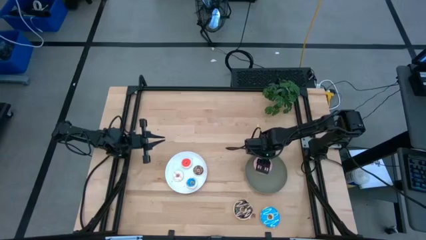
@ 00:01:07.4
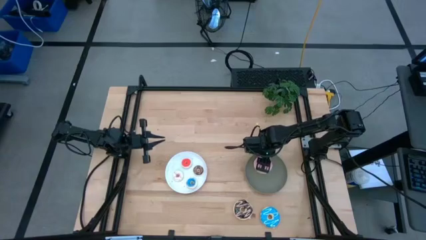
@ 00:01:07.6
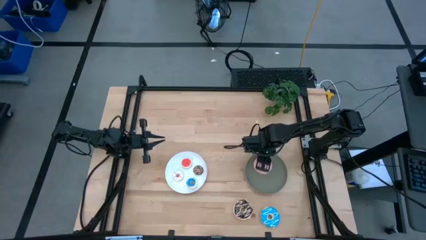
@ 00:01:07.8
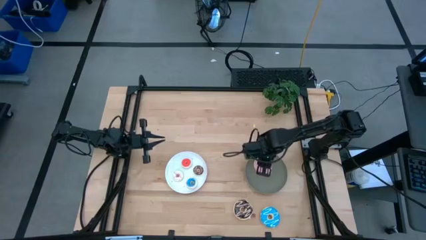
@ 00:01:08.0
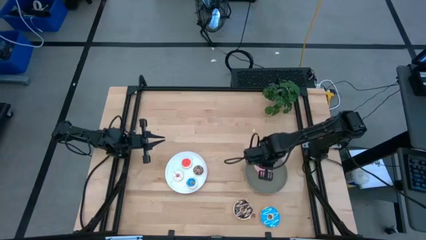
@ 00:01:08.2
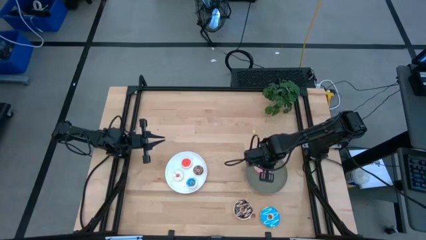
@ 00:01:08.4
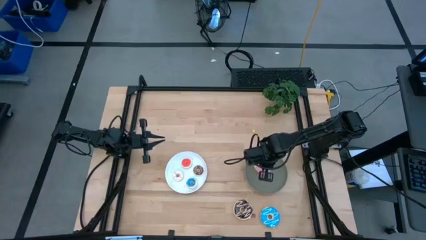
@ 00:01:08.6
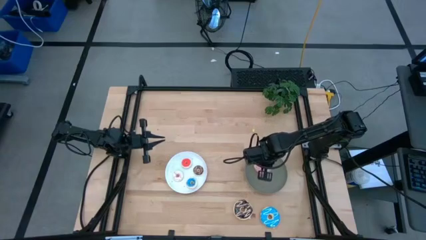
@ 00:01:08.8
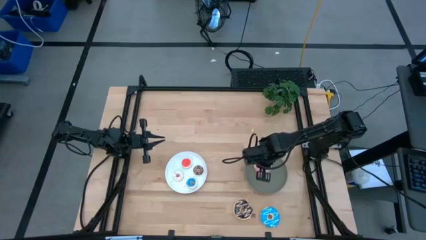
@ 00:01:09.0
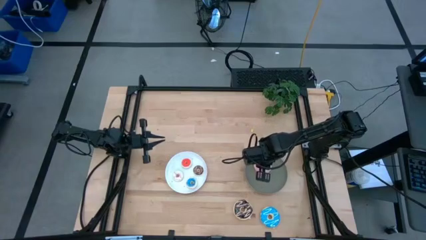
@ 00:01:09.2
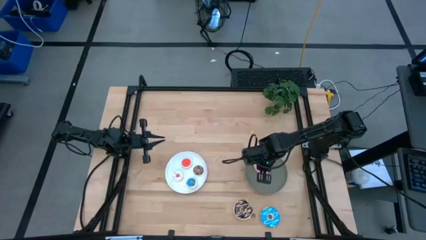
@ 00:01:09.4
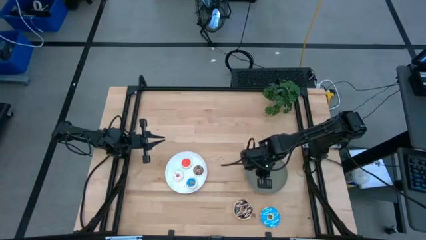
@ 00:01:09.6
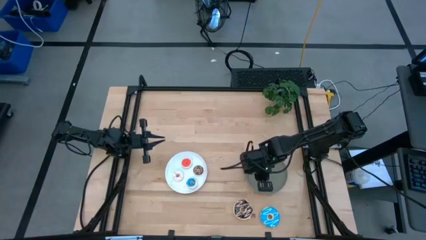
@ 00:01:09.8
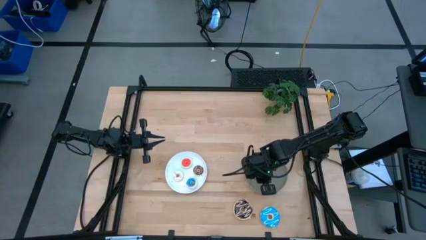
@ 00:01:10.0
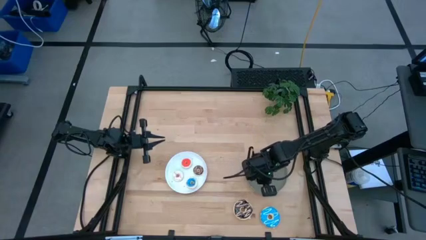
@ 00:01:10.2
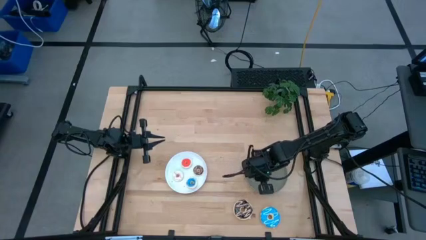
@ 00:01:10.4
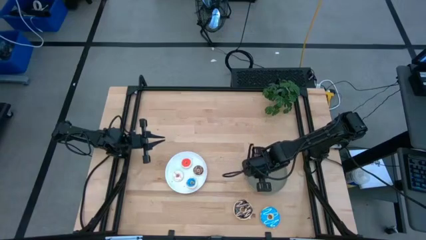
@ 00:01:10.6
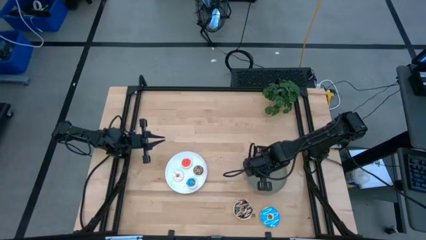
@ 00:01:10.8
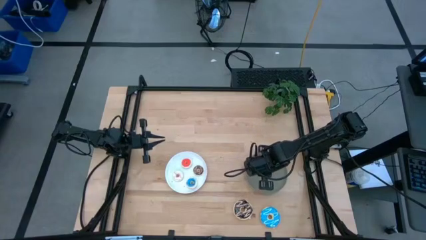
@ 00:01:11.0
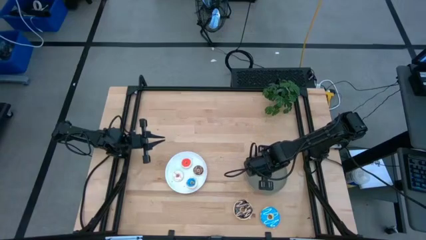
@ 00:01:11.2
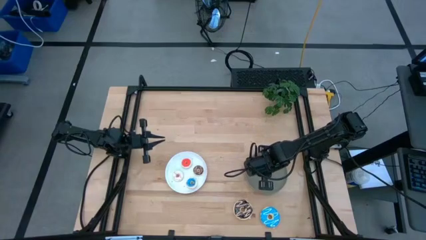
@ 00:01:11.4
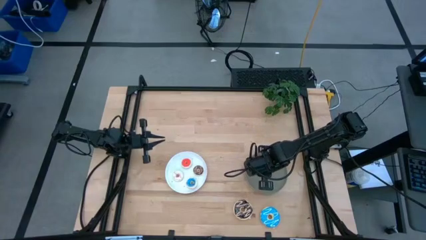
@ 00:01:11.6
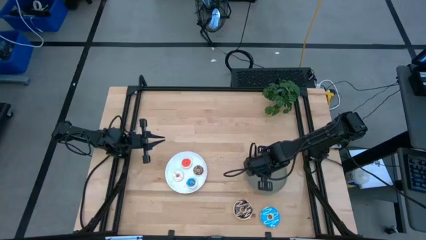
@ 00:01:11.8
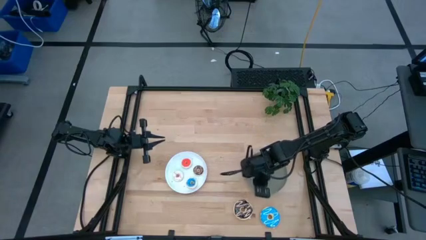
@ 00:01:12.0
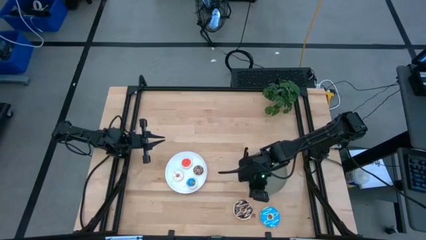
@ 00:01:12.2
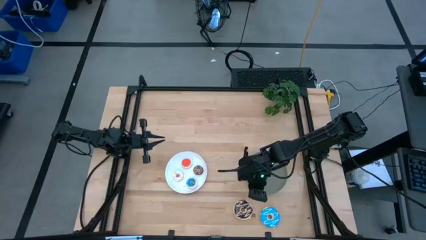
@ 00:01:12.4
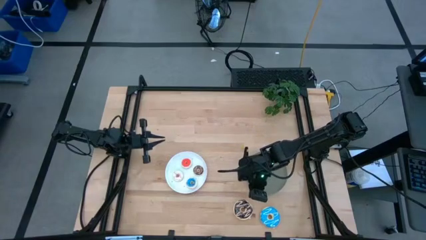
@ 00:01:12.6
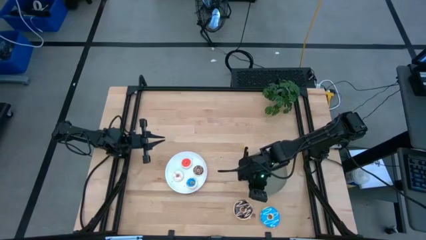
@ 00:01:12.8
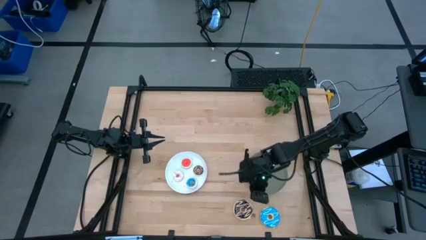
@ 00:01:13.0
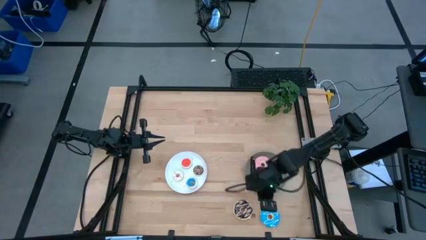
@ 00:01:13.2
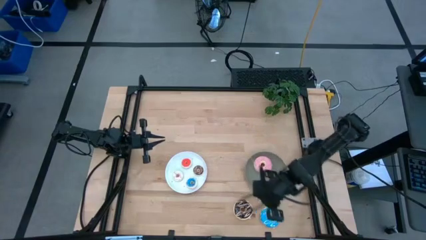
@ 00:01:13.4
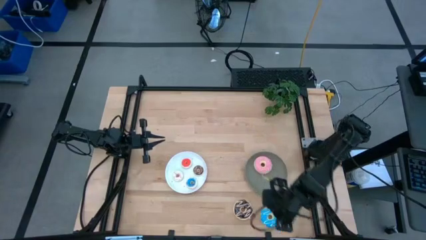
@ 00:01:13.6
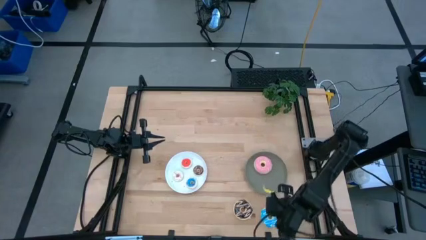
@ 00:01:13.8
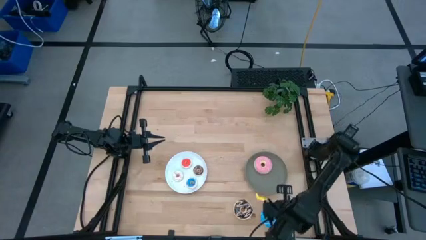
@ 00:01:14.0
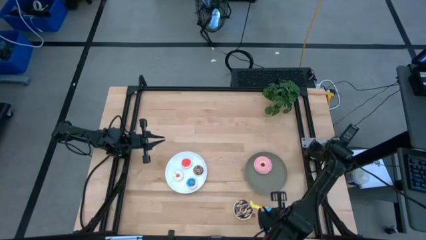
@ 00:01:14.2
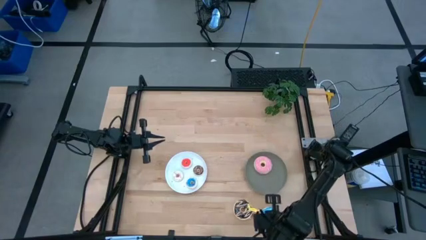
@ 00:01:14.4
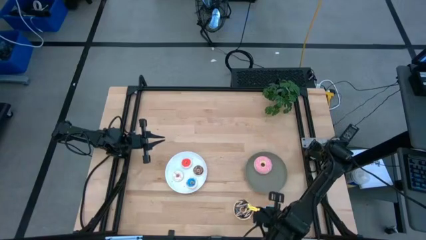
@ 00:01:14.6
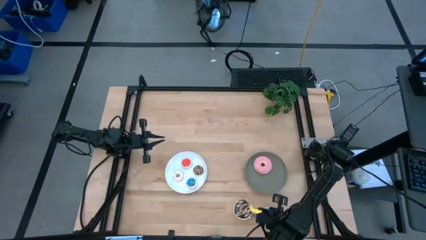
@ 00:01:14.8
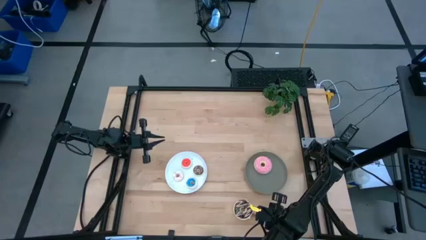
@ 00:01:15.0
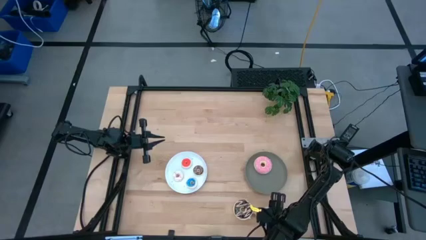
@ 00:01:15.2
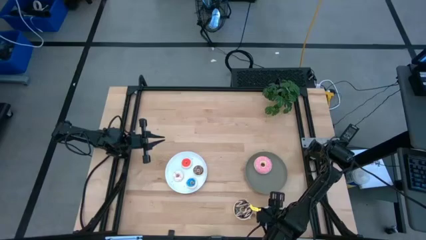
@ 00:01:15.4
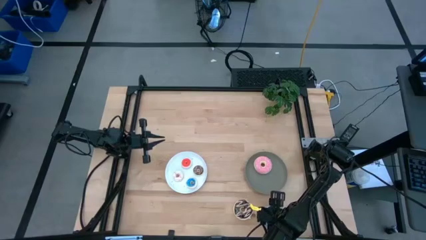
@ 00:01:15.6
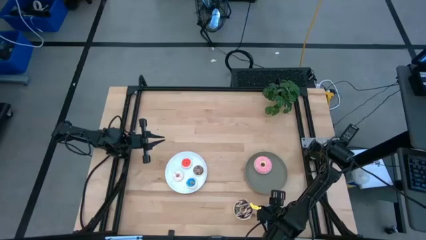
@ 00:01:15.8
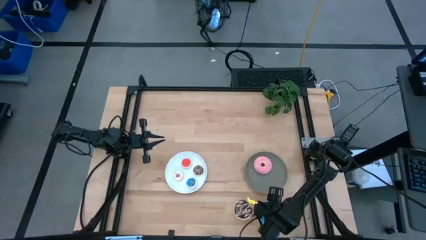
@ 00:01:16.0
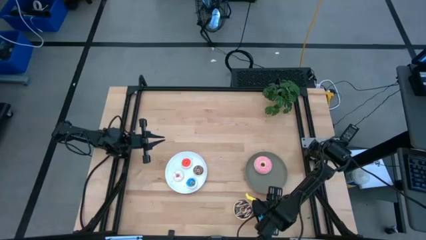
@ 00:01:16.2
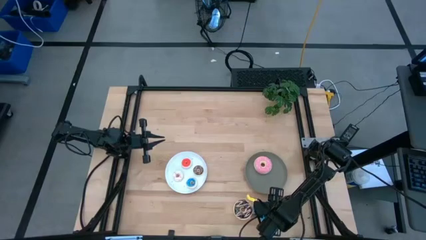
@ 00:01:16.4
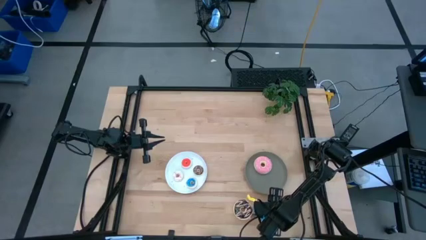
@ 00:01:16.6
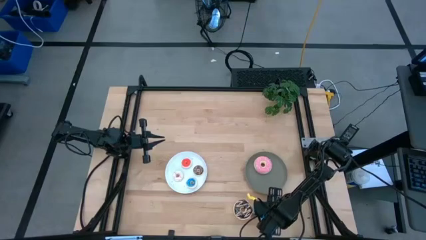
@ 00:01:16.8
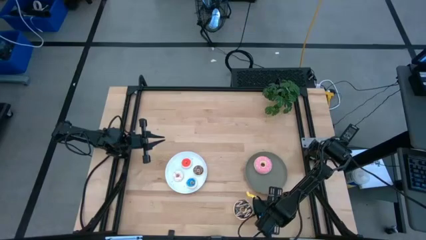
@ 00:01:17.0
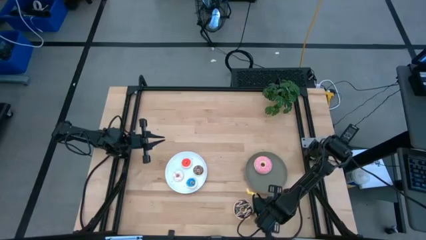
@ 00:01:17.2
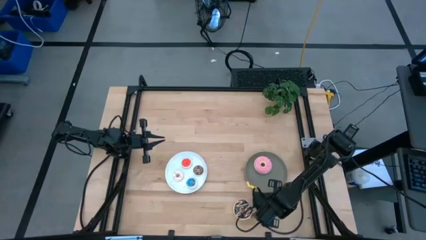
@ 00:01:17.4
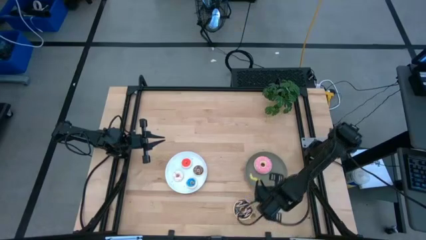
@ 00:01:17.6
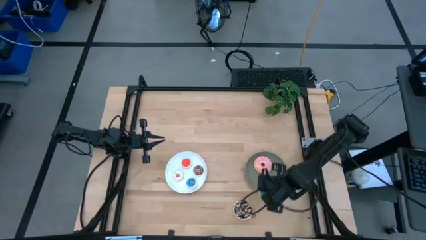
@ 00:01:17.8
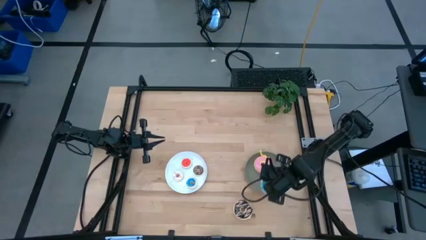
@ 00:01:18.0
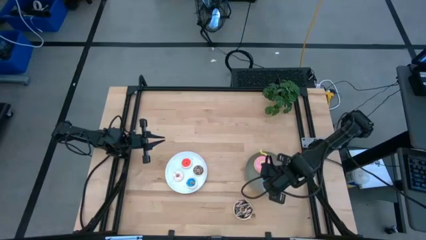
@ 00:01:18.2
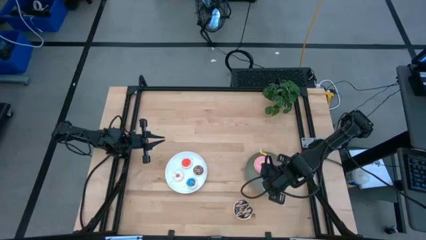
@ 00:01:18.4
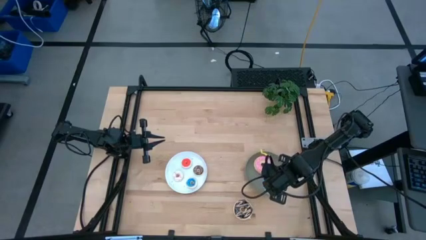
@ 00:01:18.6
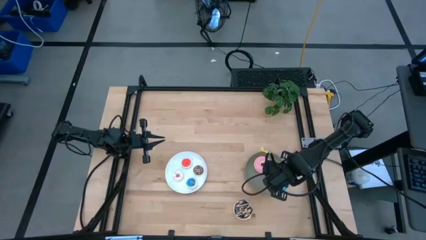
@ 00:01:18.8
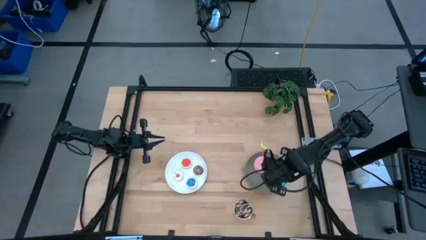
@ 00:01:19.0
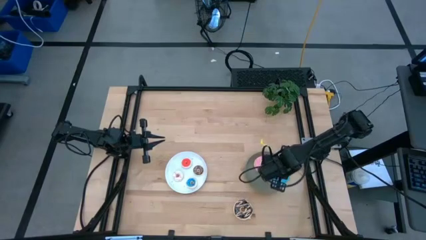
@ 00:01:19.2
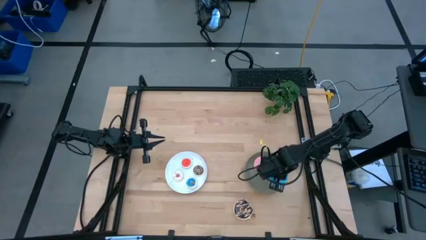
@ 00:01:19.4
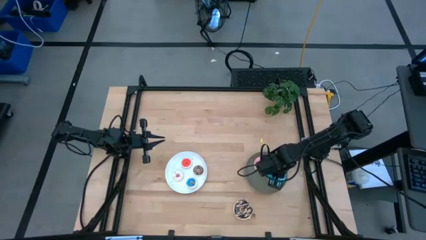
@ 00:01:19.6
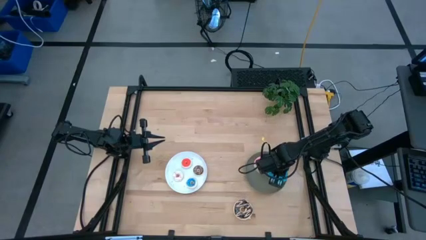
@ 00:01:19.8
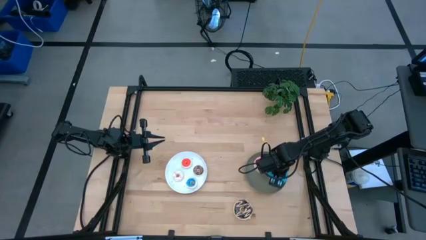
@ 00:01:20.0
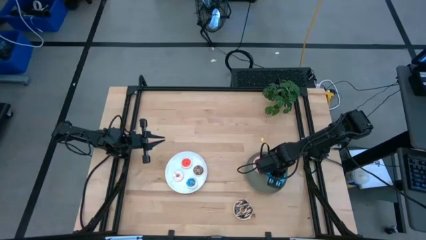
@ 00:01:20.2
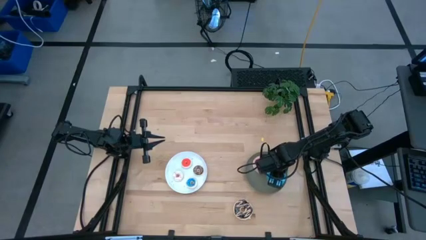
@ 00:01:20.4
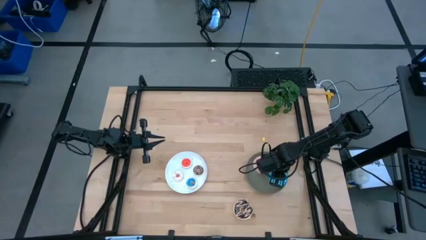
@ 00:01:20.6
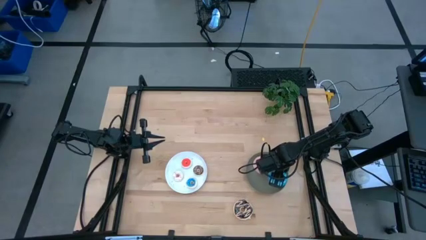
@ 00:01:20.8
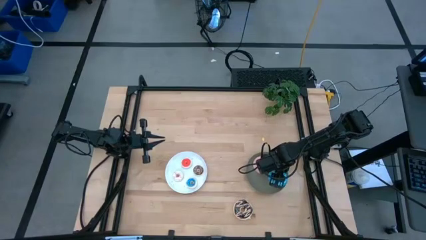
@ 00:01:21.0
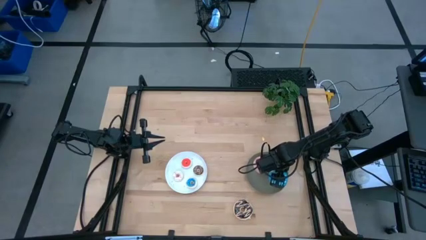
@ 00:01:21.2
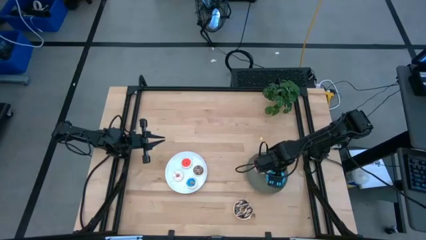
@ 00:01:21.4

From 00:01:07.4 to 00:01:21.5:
Task: Pick & Place donuts
Put the large blue donut on the gray plate
